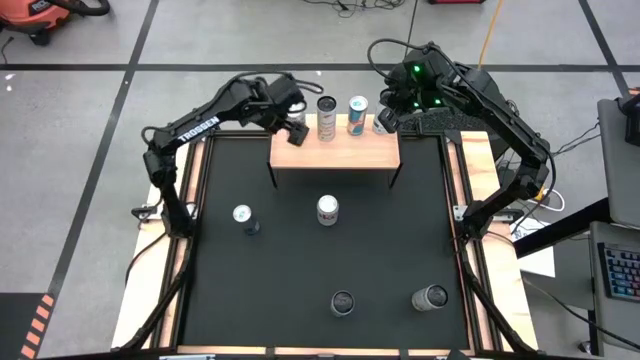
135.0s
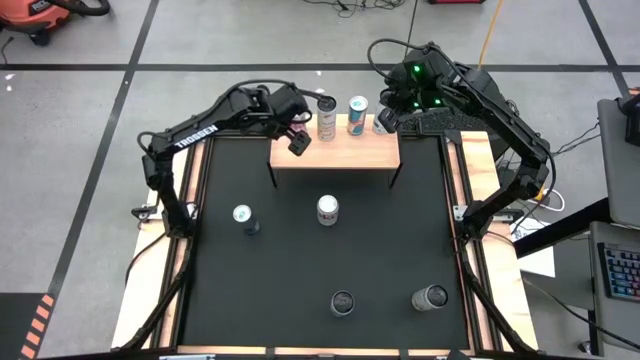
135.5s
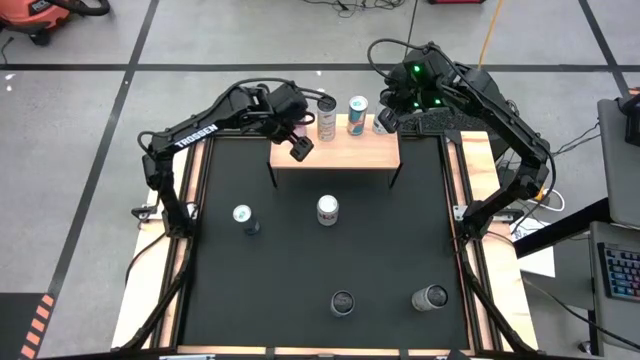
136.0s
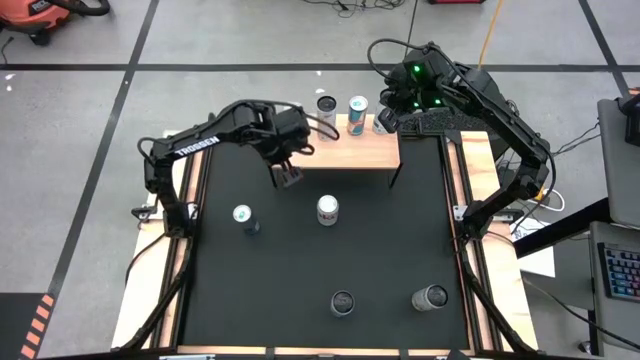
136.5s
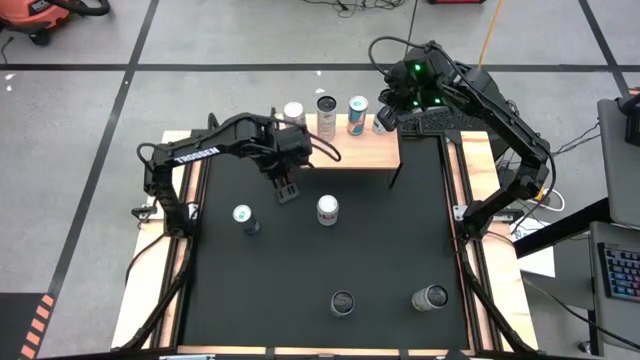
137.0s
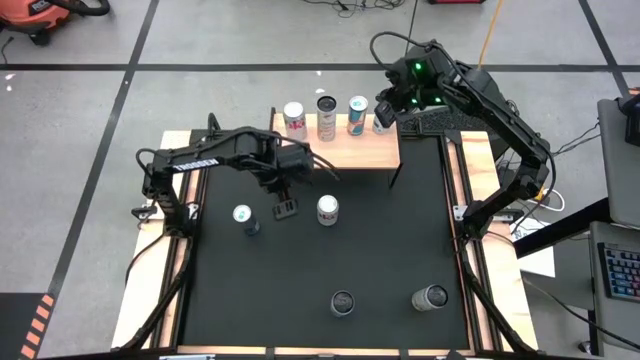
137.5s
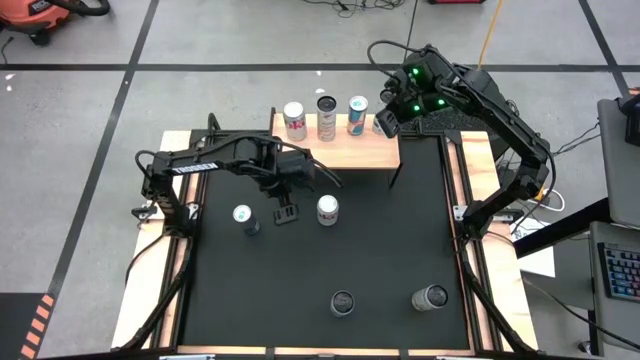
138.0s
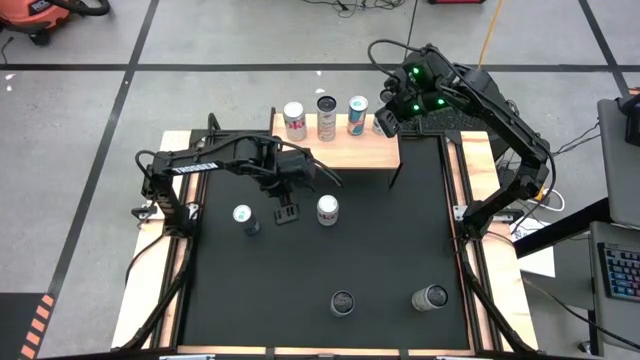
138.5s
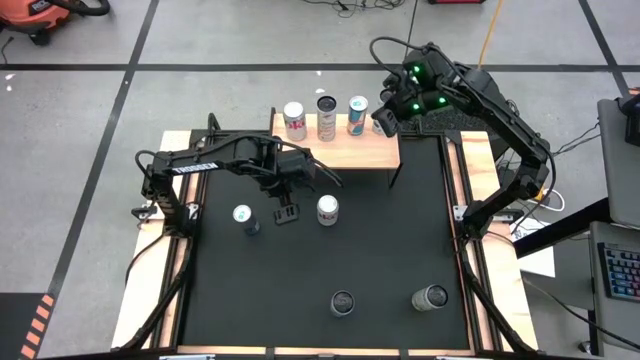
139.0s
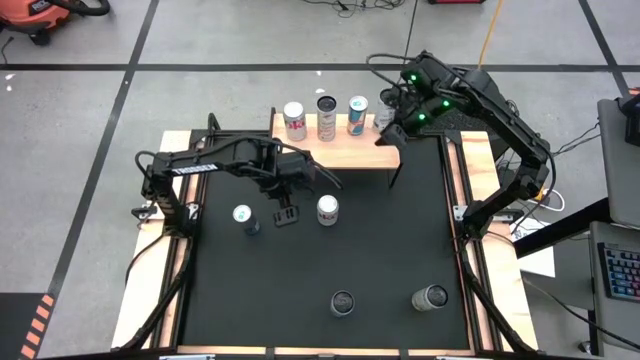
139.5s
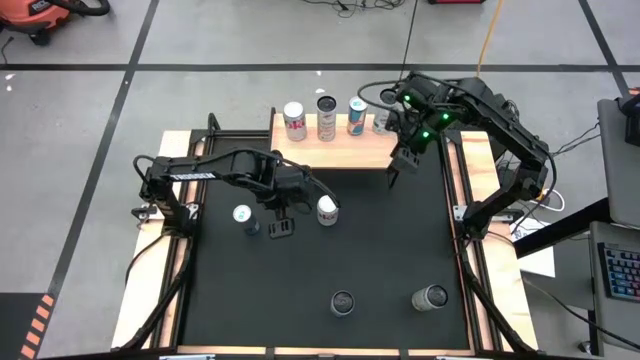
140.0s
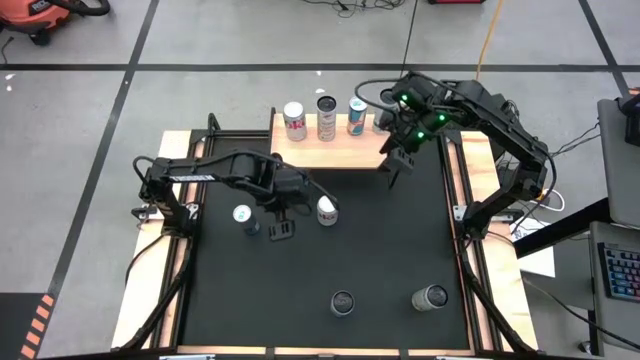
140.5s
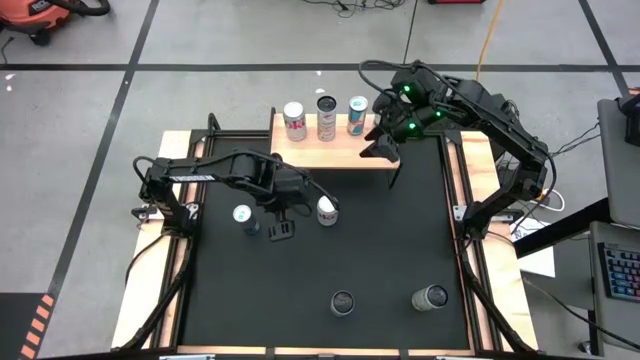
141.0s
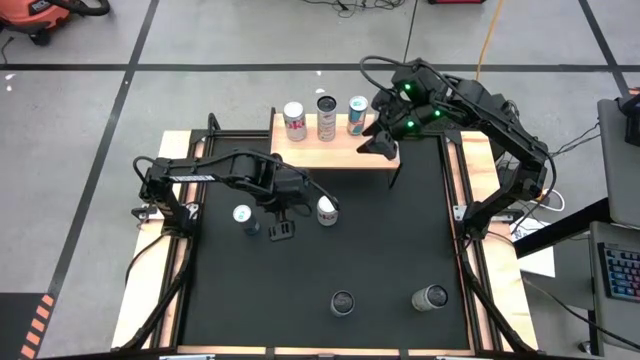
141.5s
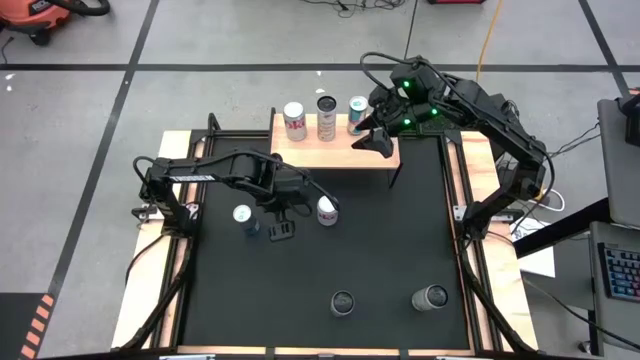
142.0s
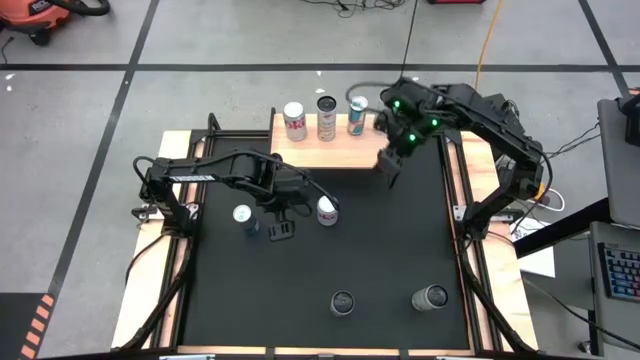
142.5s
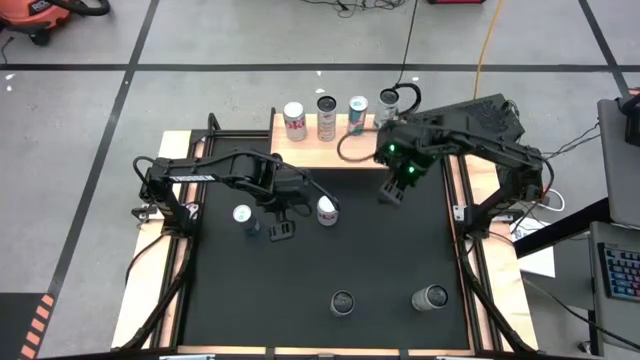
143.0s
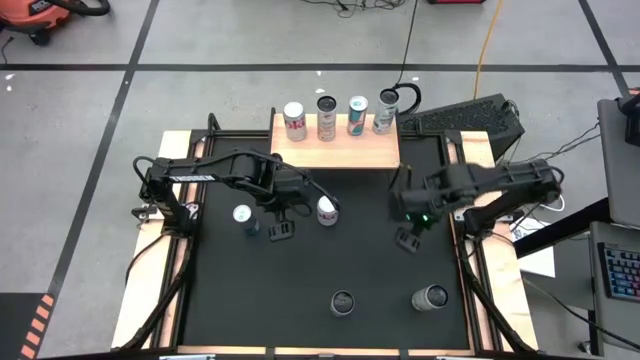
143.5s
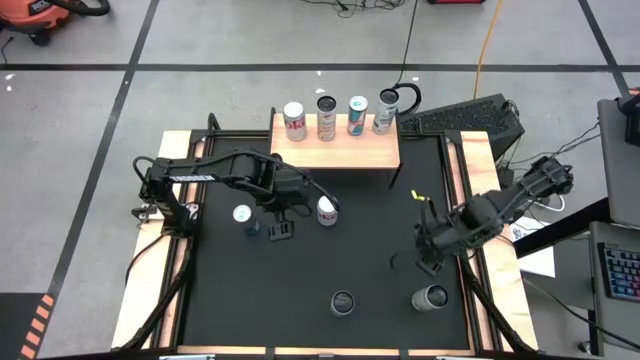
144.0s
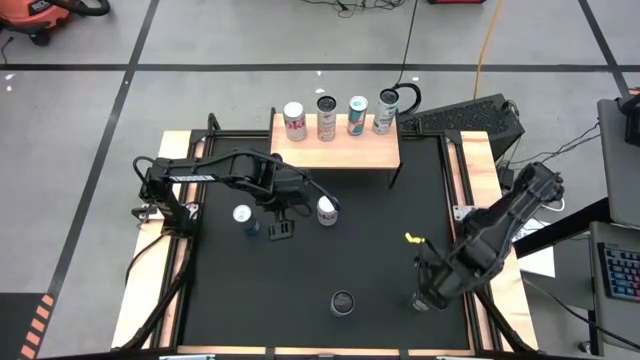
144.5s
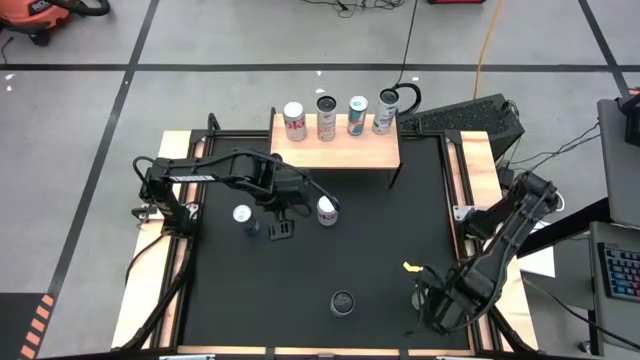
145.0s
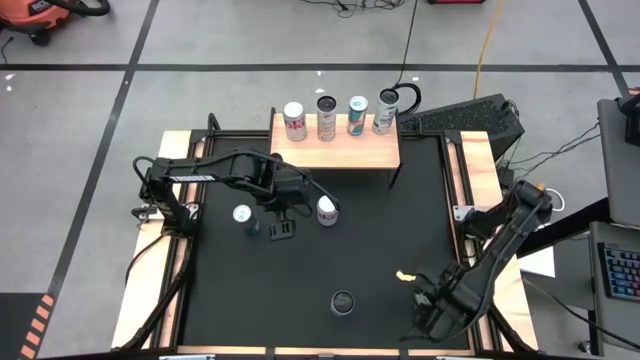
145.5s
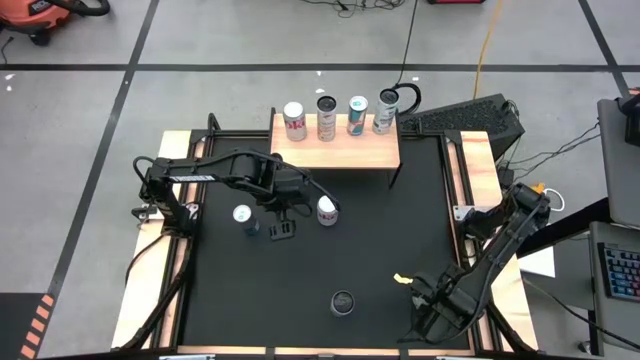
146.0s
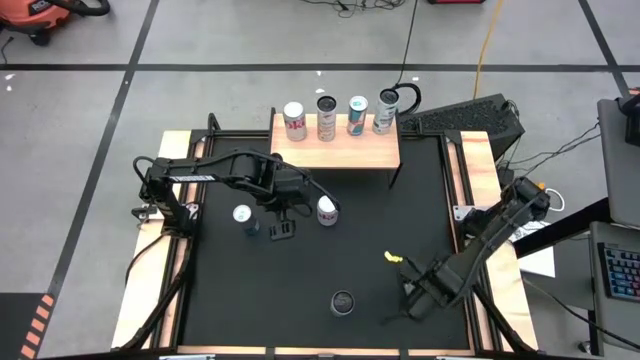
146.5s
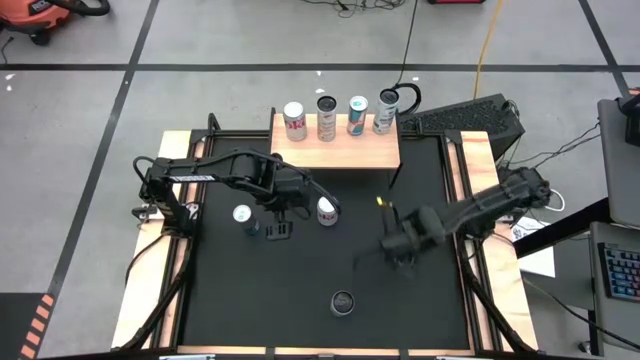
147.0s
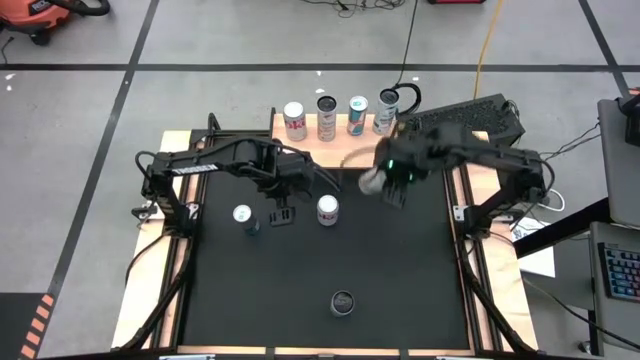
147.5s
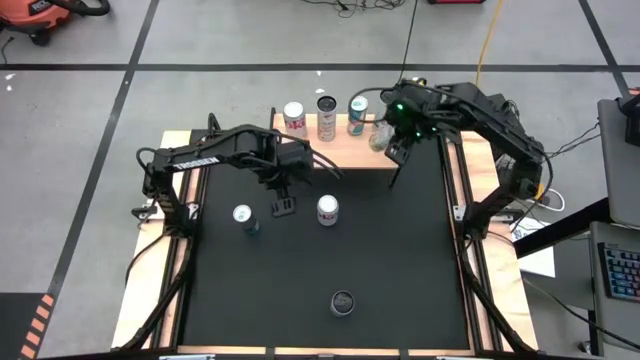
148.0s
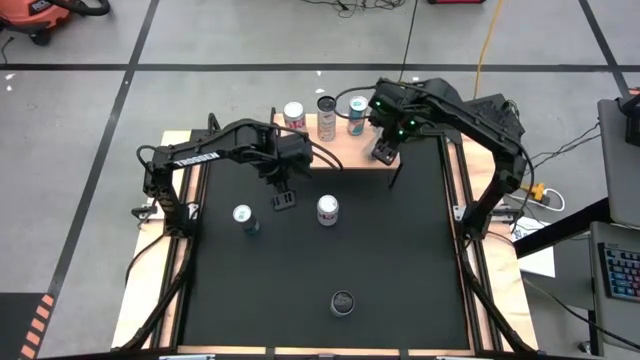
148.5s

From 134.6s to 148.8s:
Task: Place canned beverage on shelf
Put the white and yellow soda can aligned with the other white and yellow soda can on the shelf
